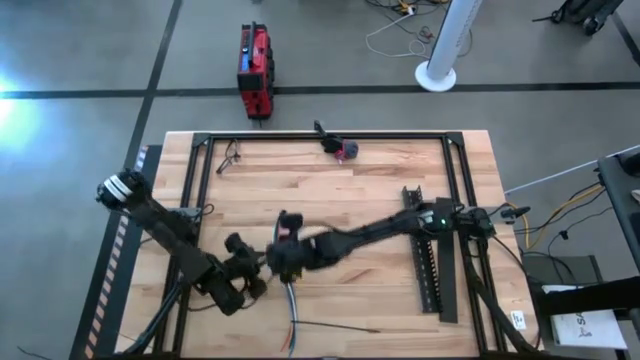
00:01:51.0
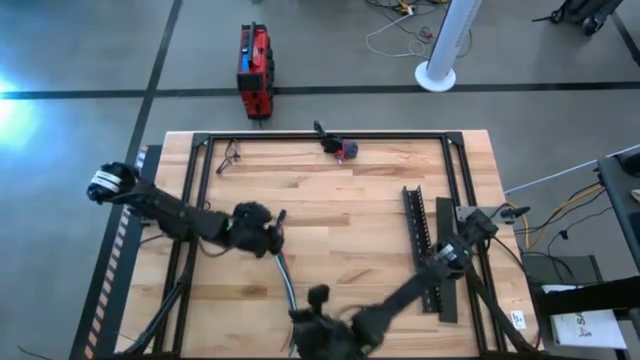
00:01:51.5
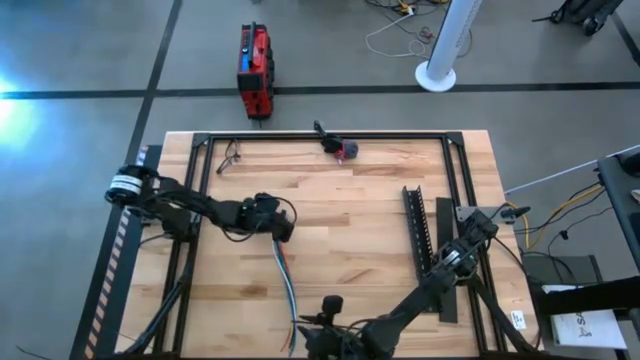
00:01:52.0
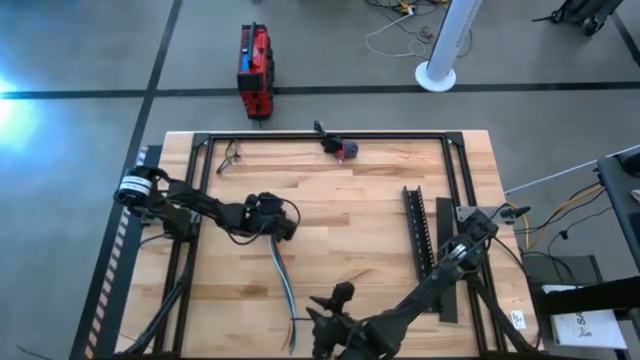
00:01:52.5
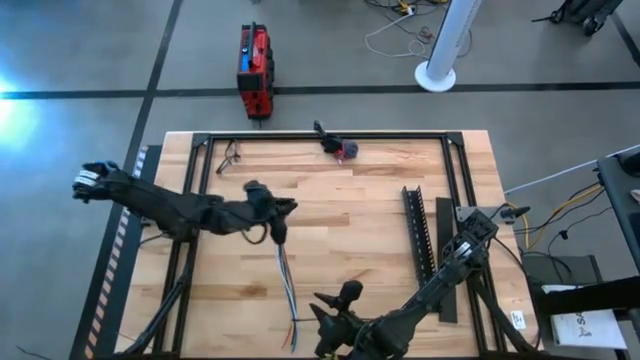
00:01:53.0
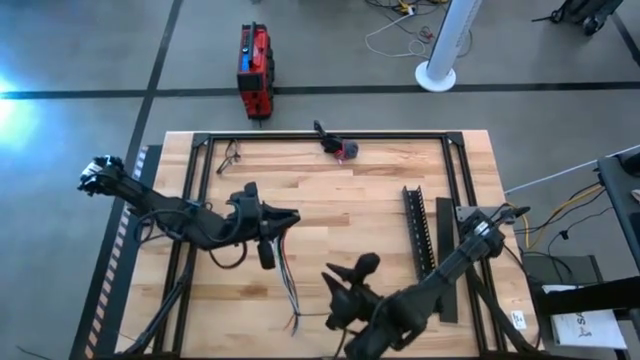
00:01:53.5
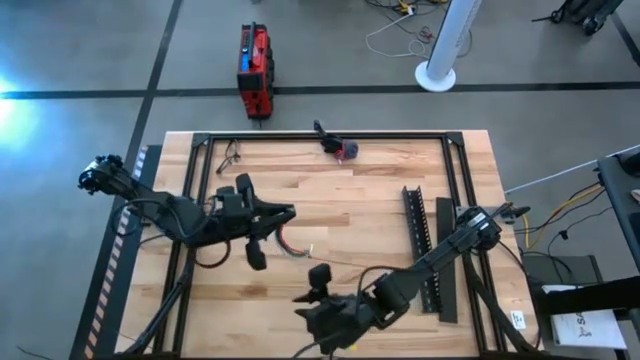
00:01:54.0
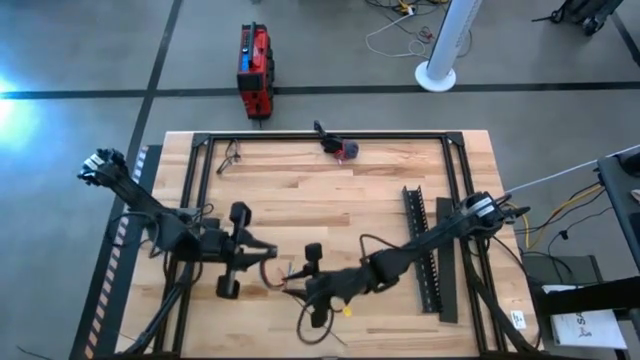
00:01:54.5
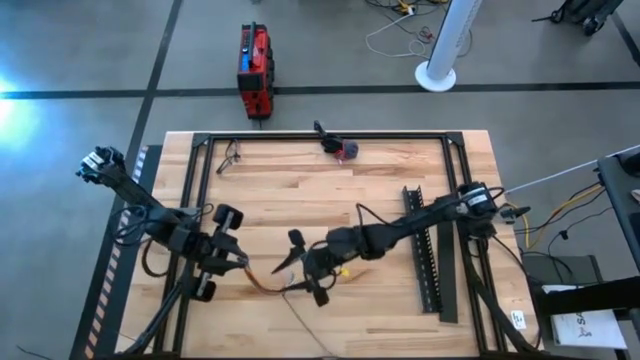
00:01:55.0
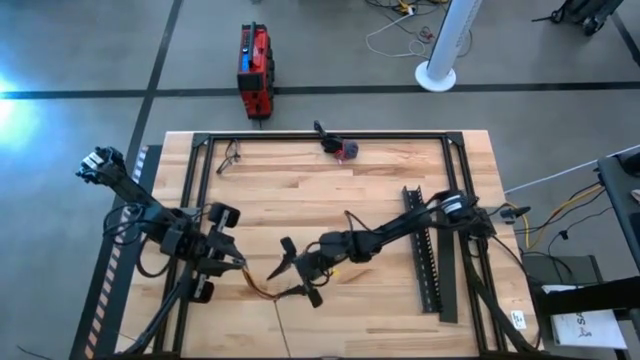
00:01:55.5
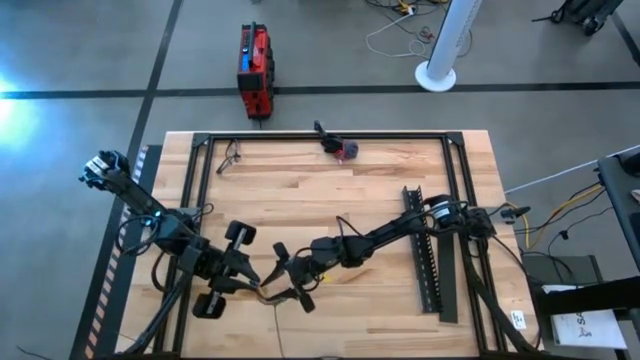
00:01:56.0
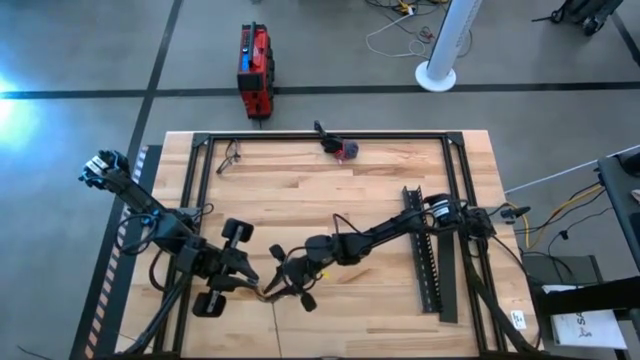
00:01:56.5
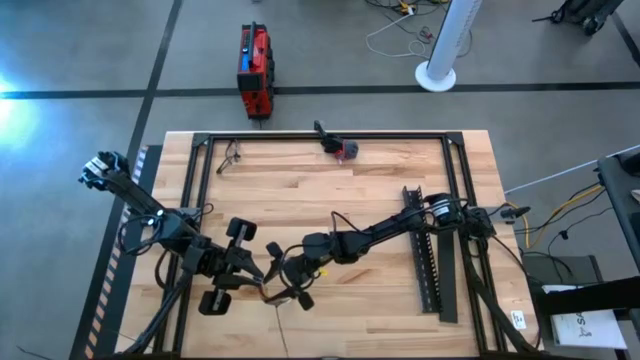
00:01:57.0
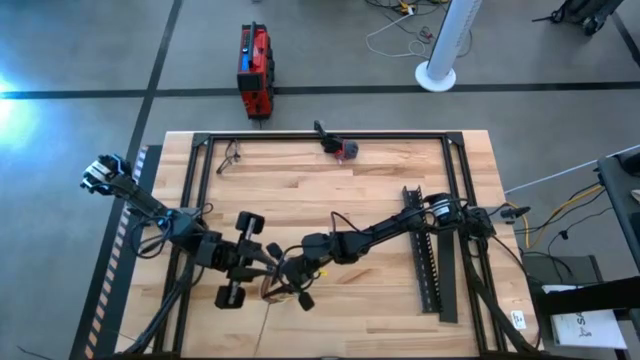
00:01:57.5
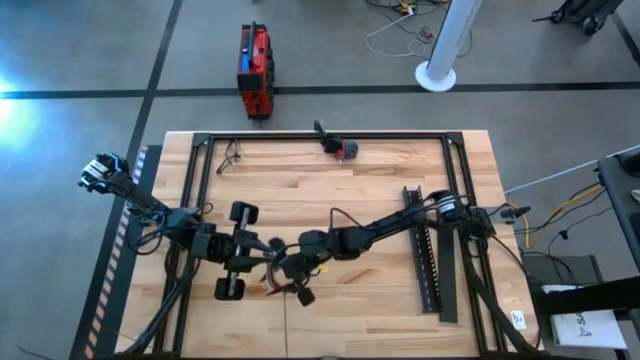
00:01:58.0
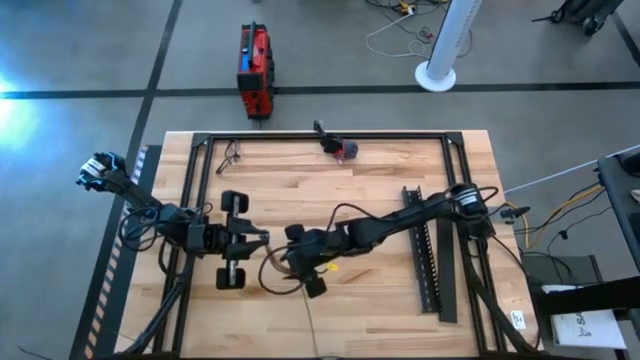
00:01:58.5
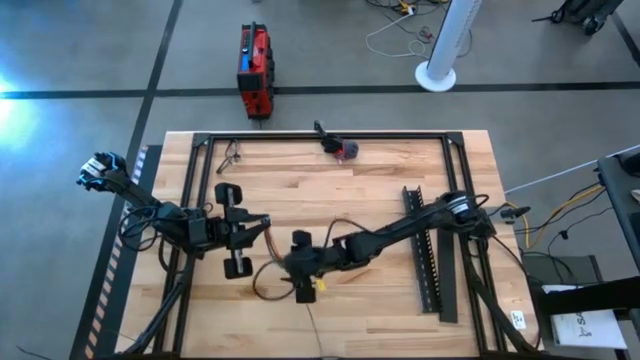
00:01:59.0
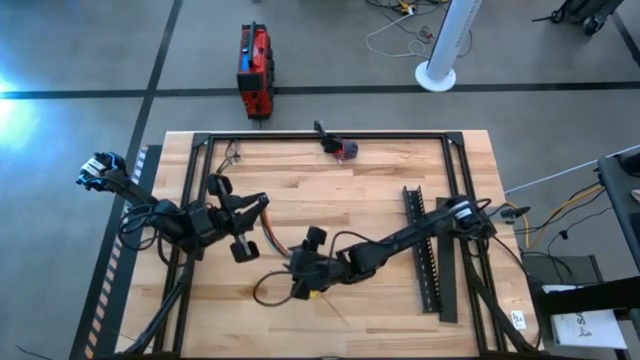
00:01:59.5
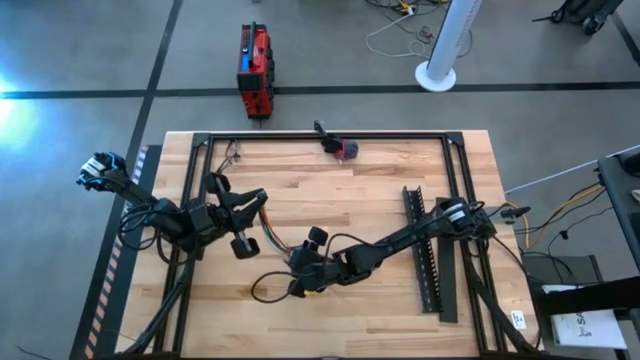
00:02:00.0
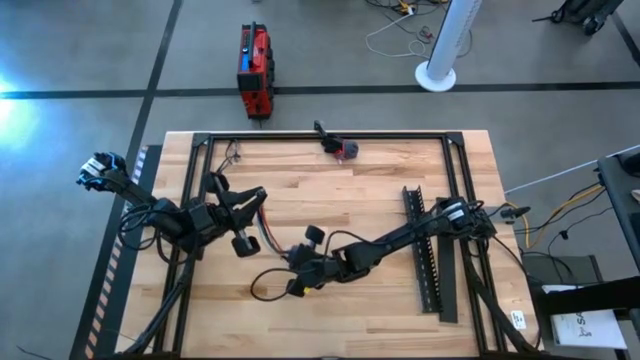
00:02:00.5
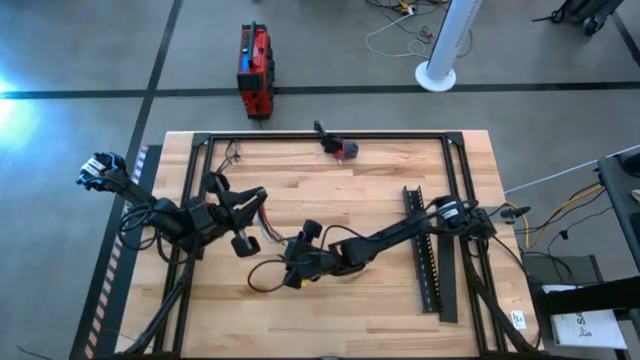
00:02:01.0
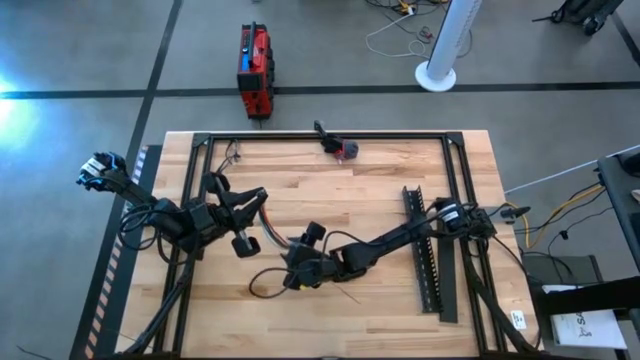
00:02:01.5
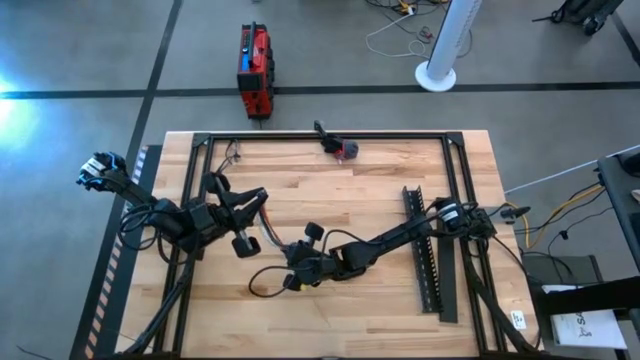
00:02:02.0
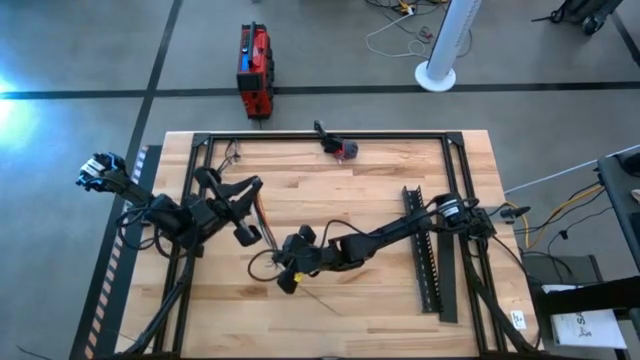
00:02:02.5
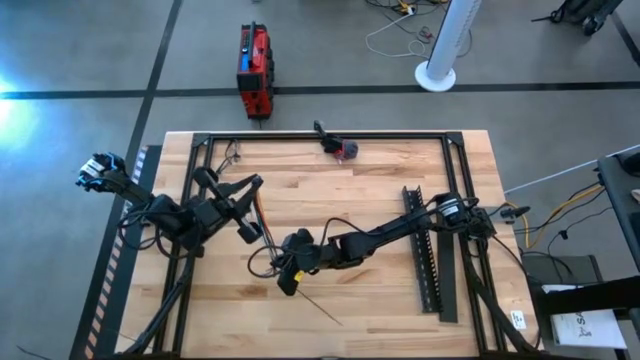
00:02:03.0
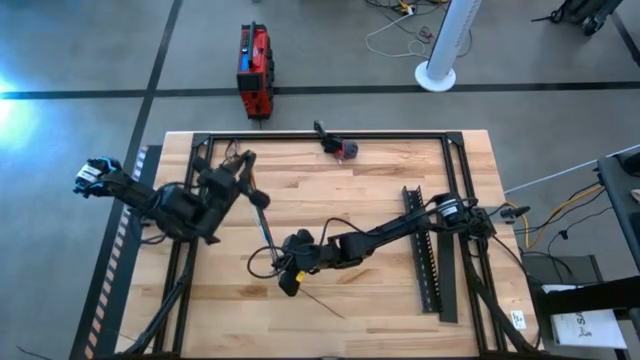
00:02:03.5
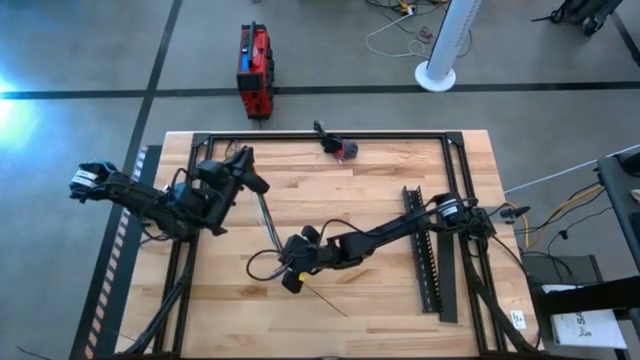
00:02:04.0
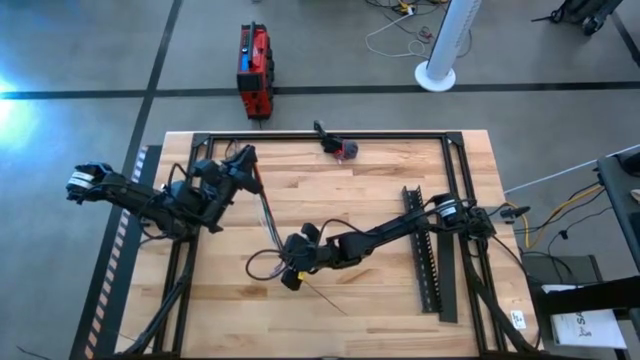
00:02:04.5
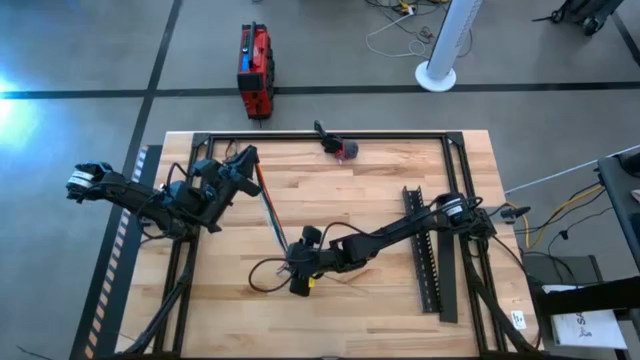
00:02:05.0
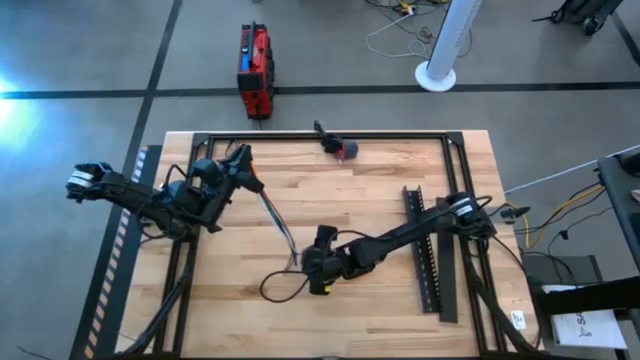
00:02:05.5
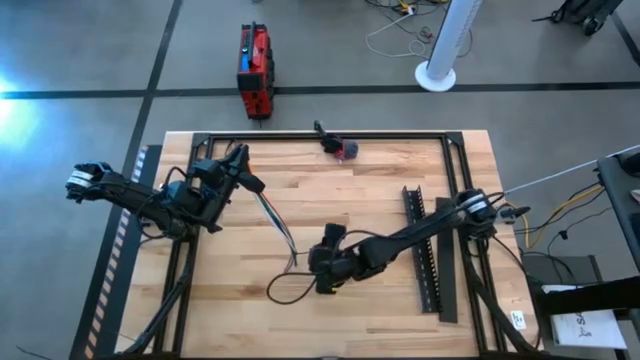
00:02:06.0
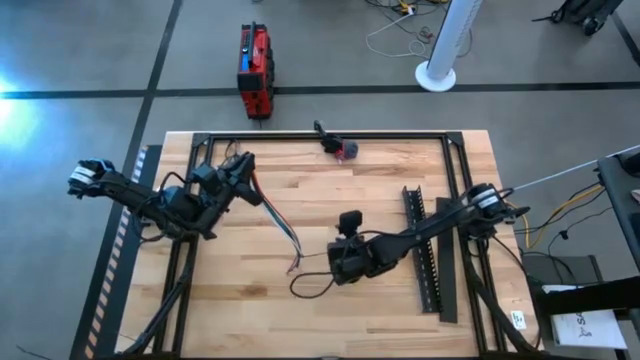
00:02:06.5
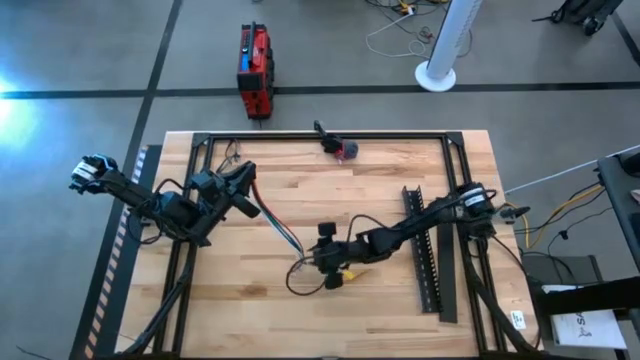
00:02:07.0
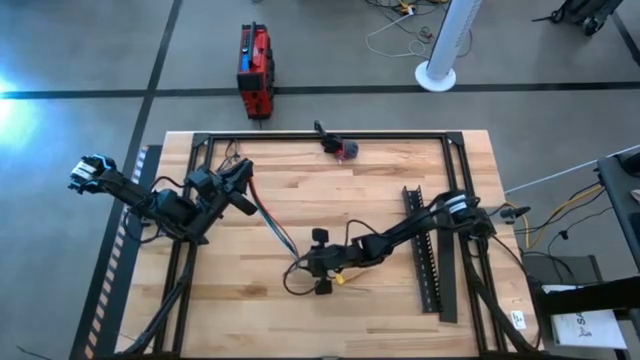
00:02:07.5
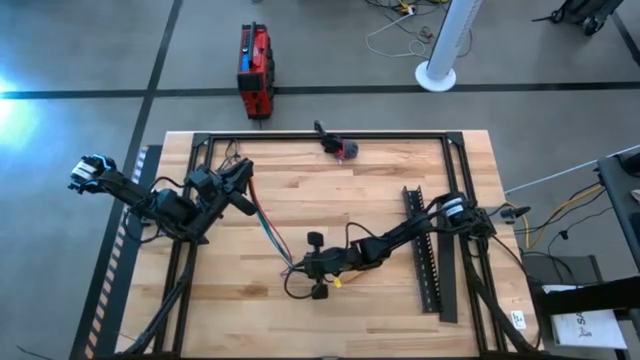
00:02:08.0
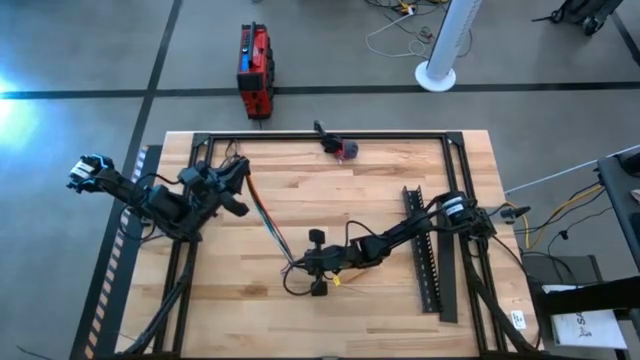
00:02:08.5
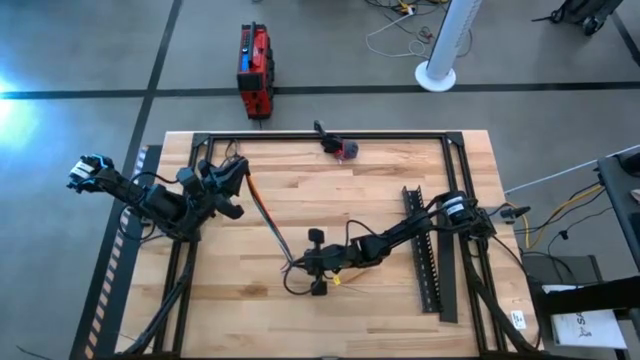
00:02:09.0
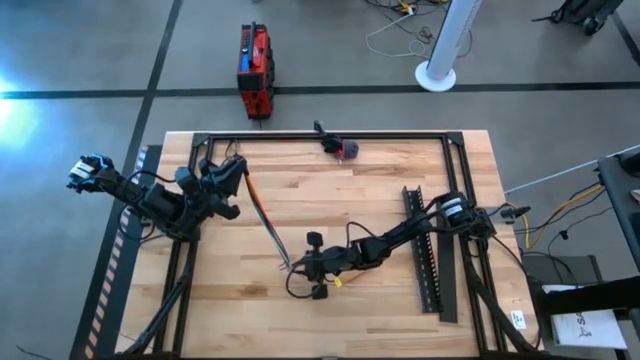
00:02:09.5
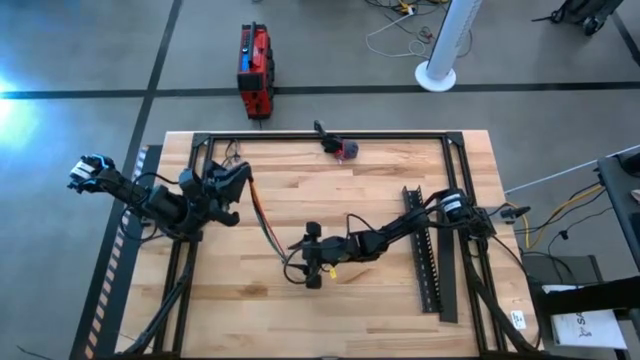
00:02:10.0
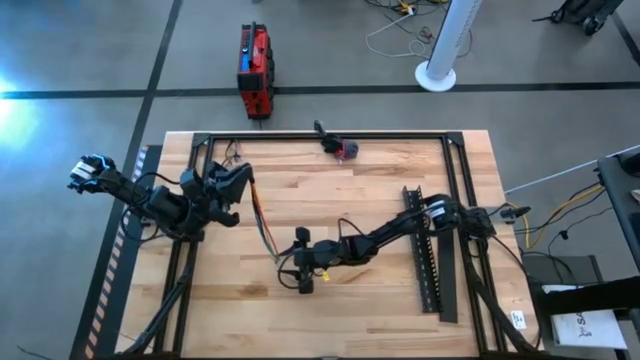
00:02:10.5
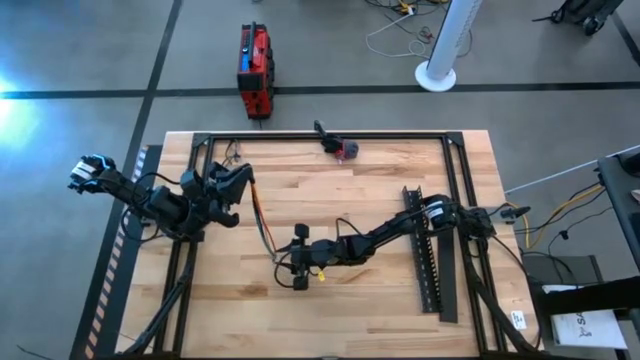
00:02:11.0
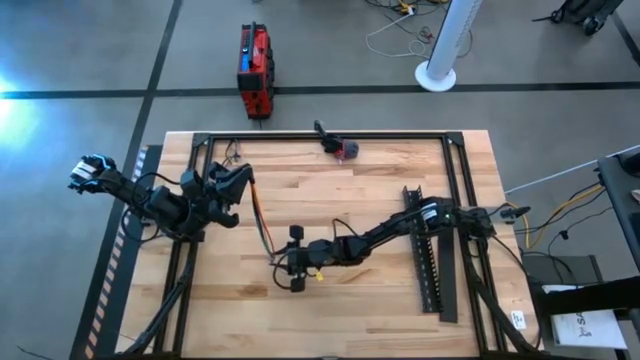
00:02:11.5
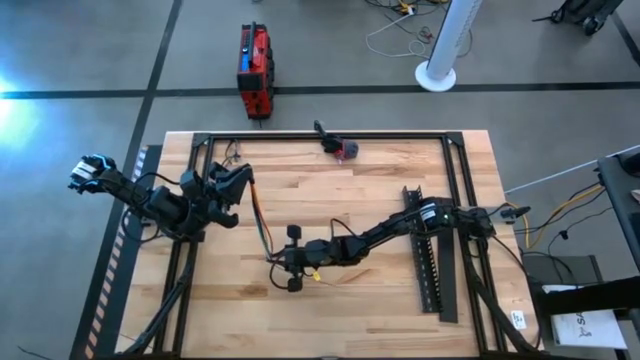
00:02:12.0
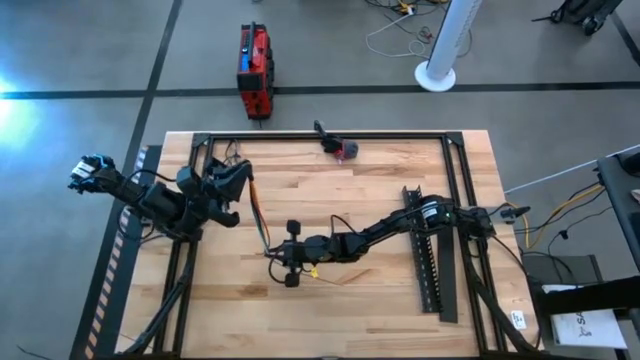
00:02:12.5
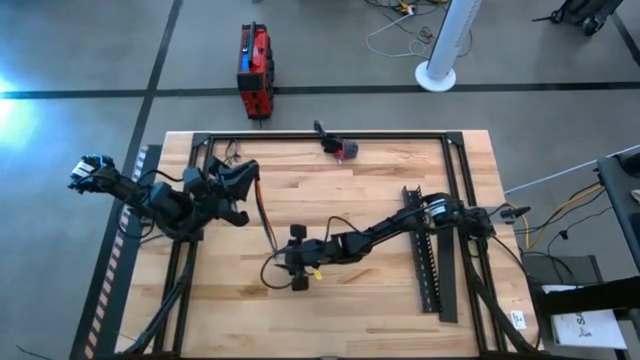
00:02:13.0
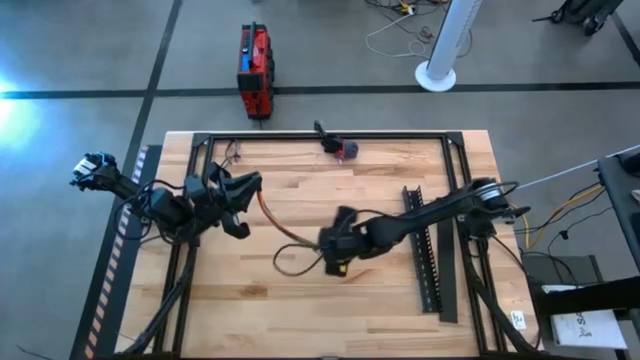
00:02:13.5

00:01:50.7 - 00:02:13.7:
Task: Ziptie cables
Close the cables together using a zip tie
